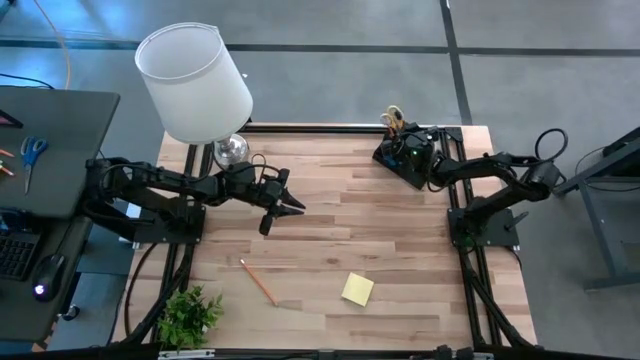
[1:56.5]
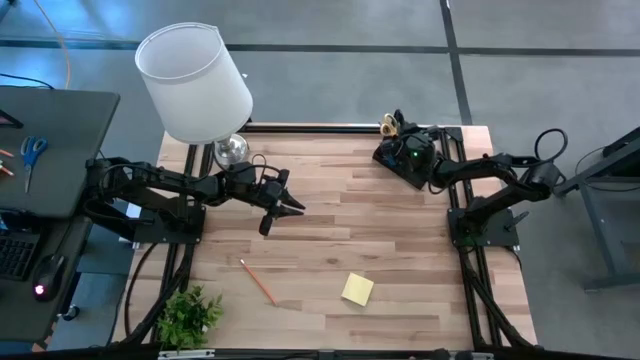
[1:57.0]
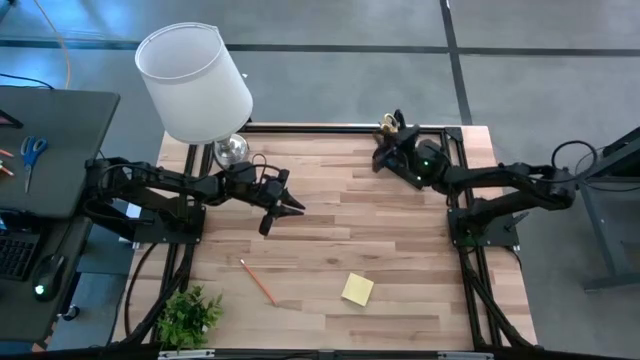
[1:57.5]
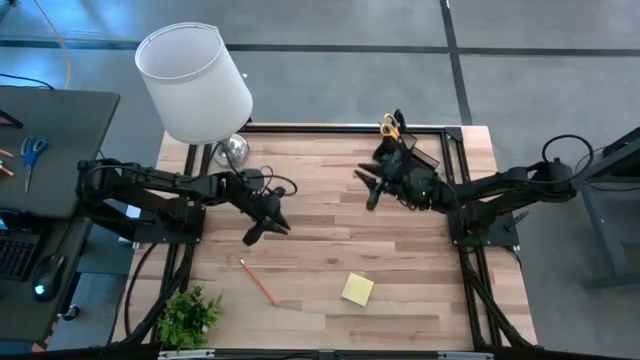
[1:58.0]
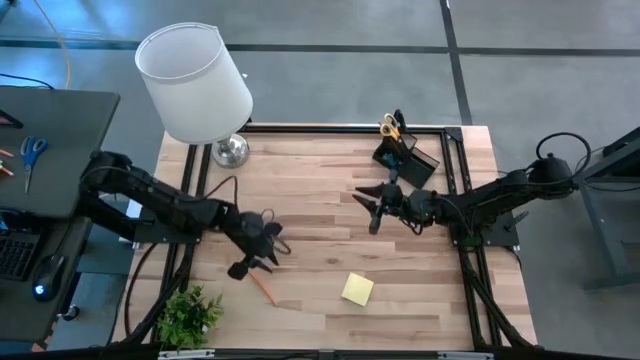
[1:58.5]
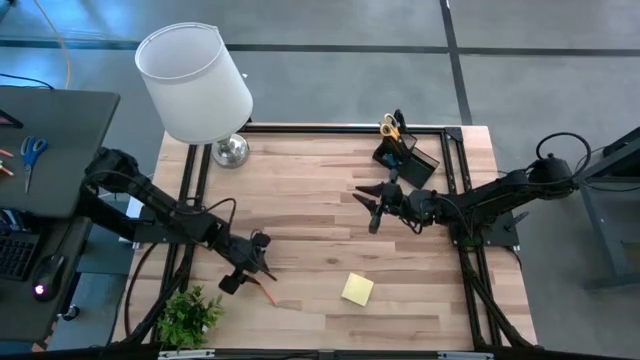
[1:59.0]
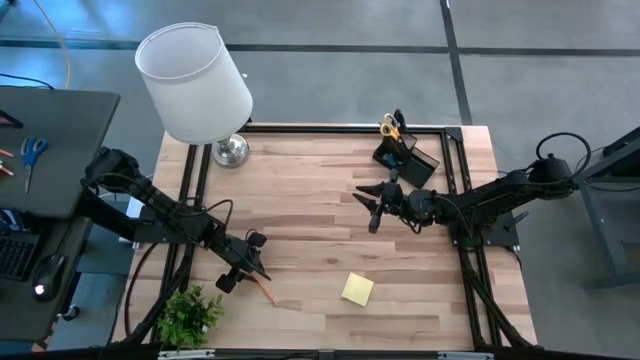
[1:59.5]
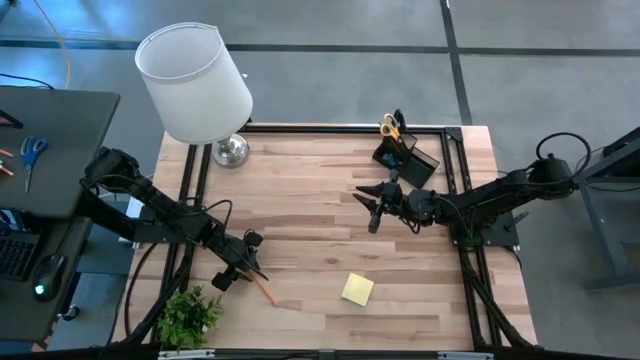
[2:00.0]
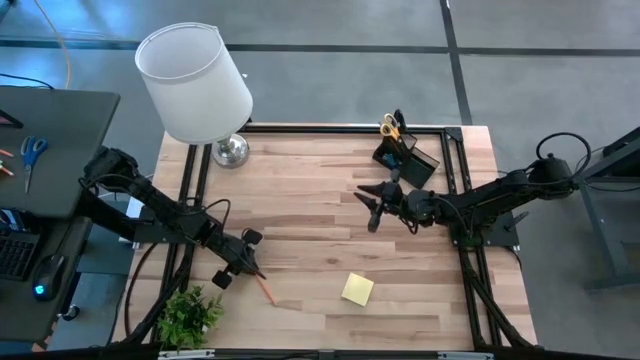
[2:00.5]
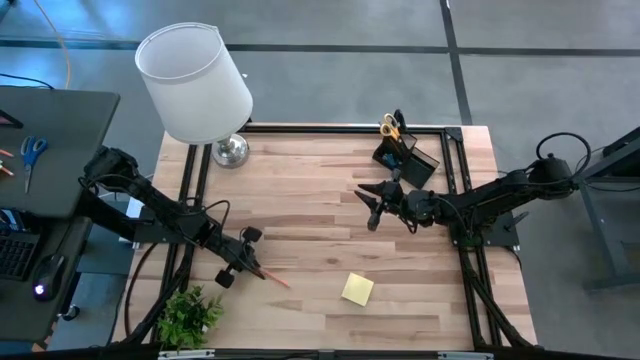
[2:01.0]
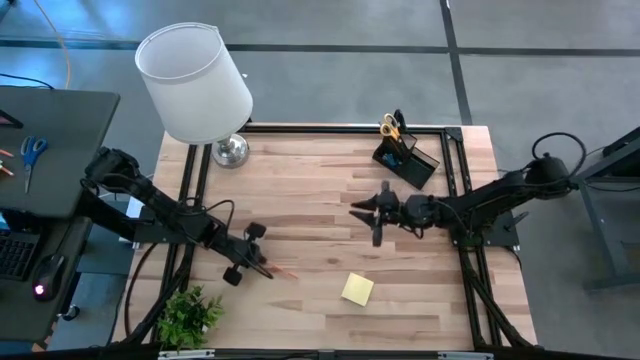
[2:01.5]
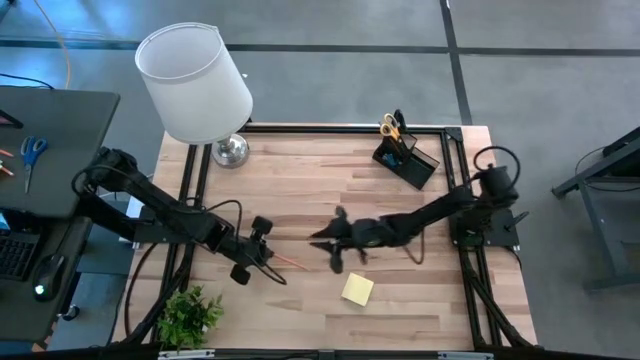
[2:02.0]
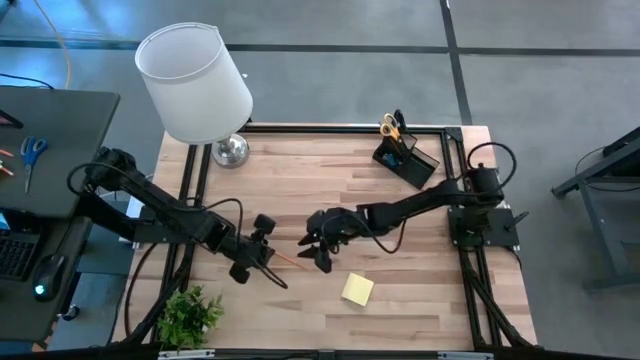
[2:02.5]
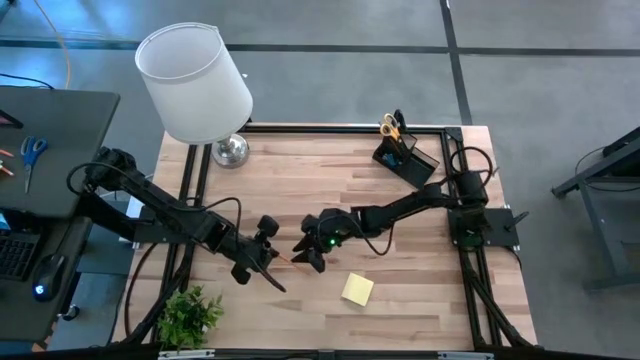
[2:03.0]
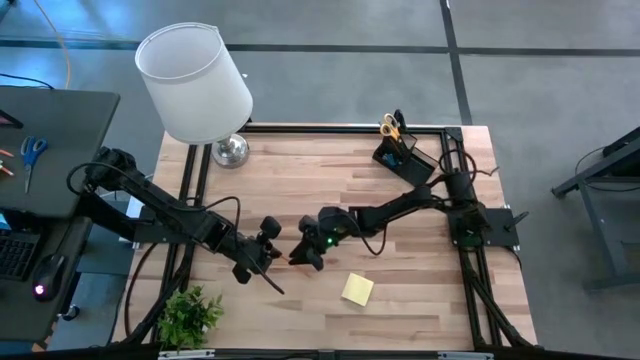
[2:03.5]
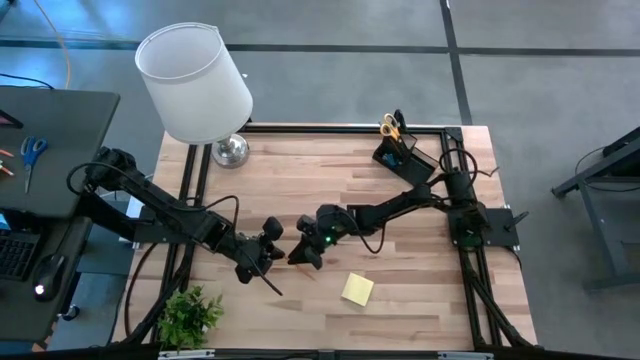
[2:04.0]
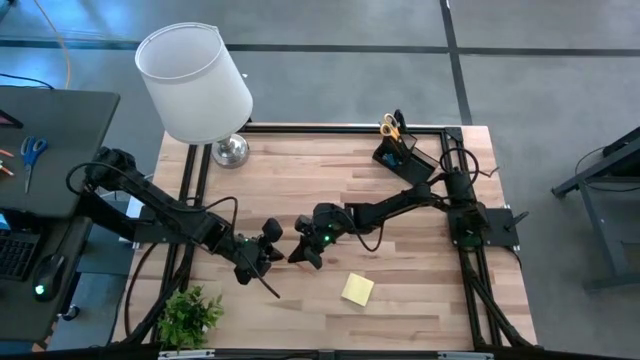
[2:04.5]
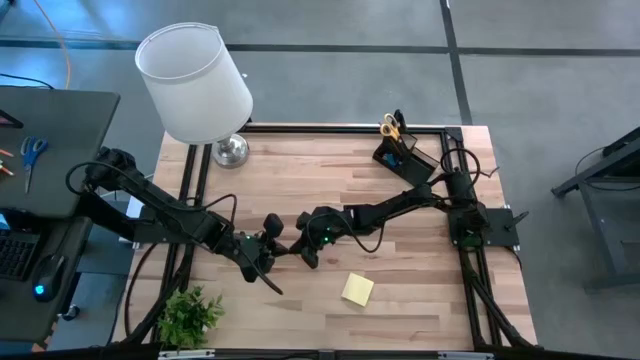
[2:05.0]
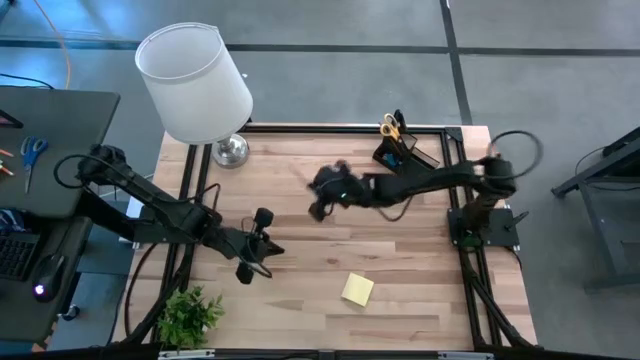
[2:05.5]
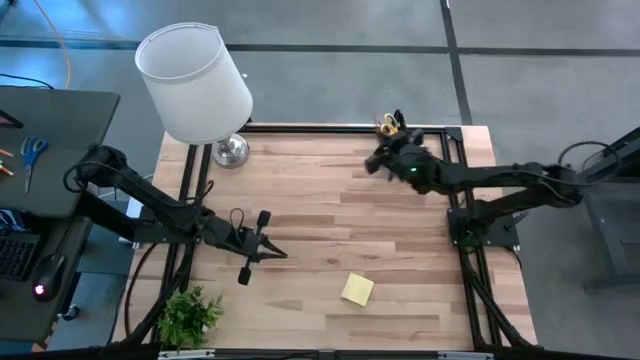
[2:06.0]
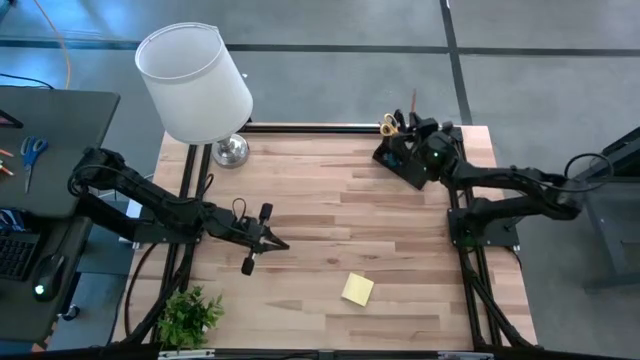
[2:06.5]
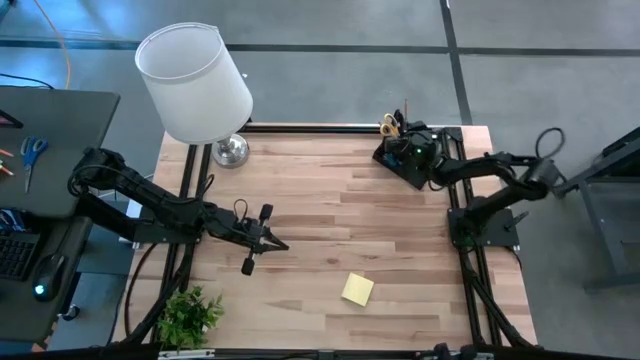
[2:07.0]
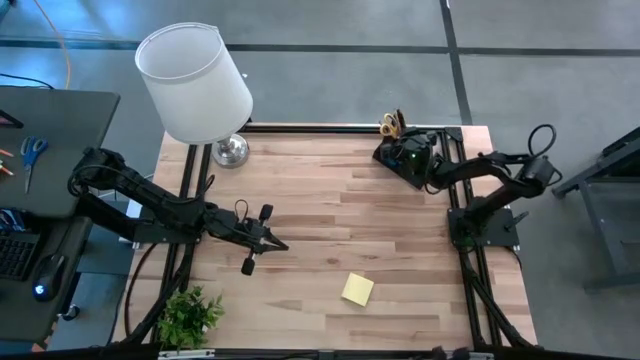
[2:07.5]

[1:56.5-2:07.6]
Task: Pick and place office supplies into organizer
Put the orange pencil into the mesh desk organizer

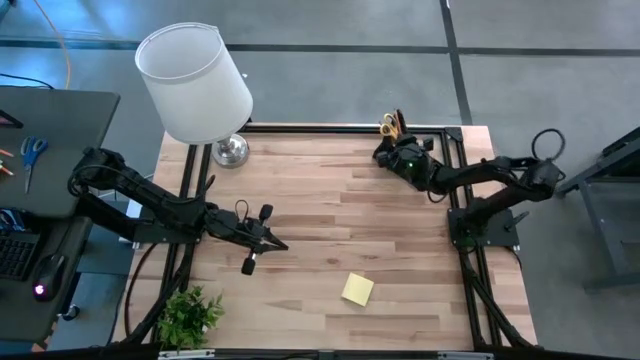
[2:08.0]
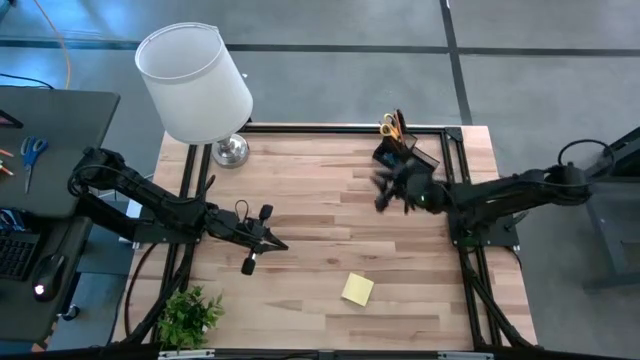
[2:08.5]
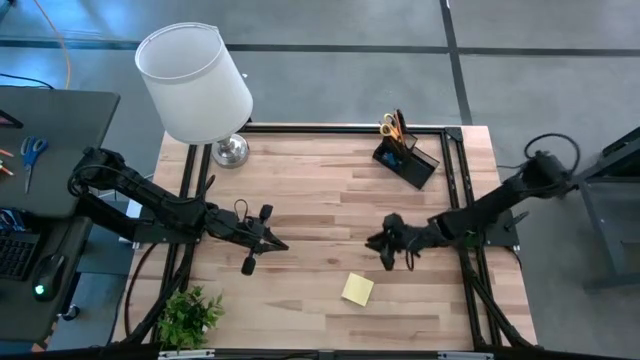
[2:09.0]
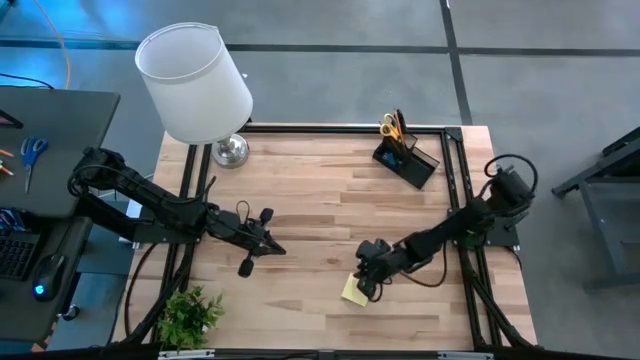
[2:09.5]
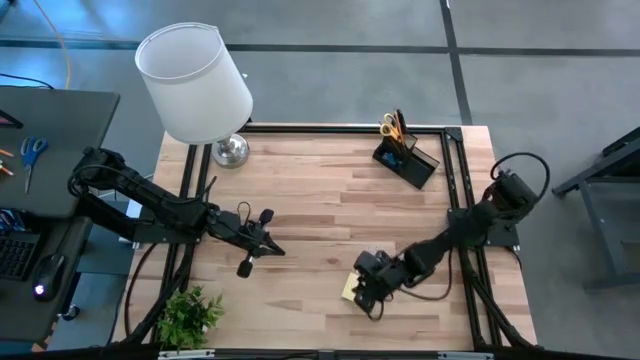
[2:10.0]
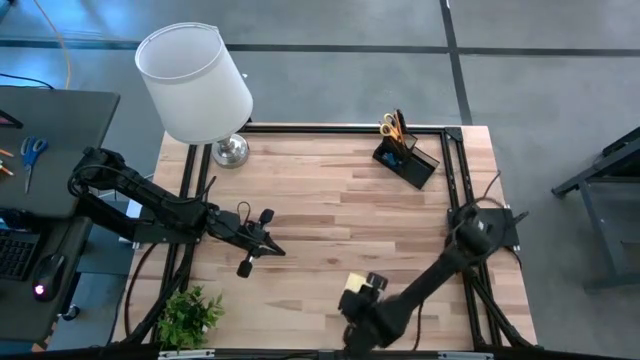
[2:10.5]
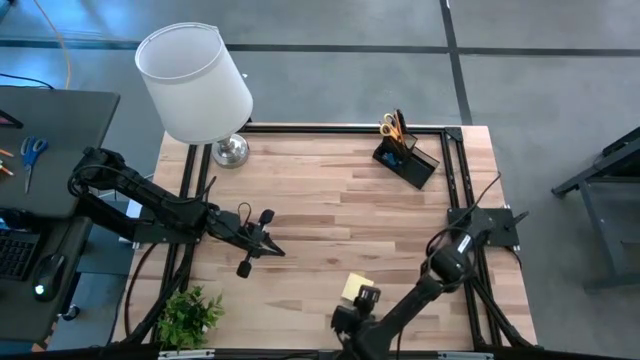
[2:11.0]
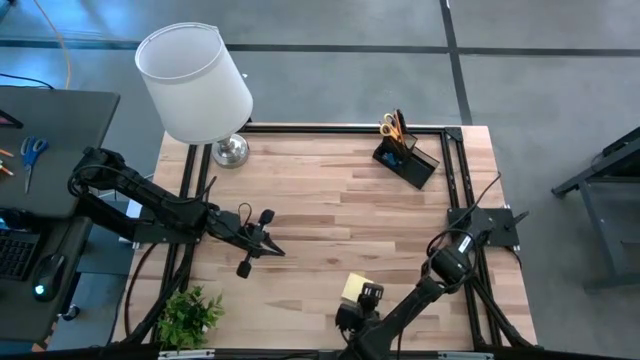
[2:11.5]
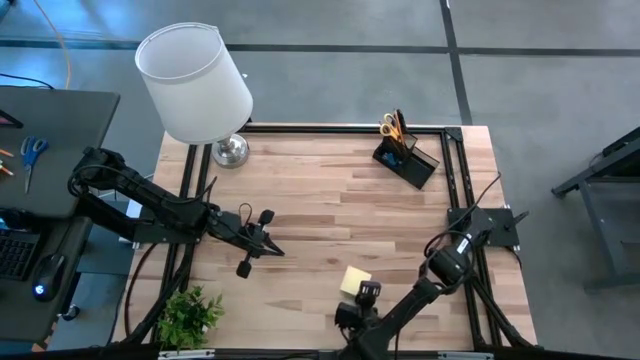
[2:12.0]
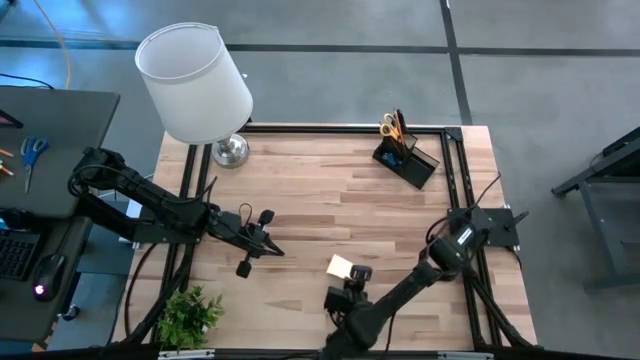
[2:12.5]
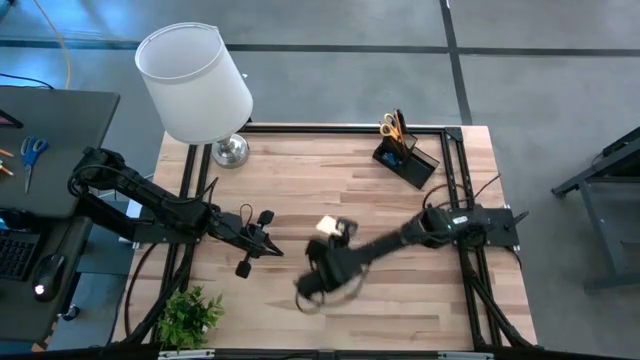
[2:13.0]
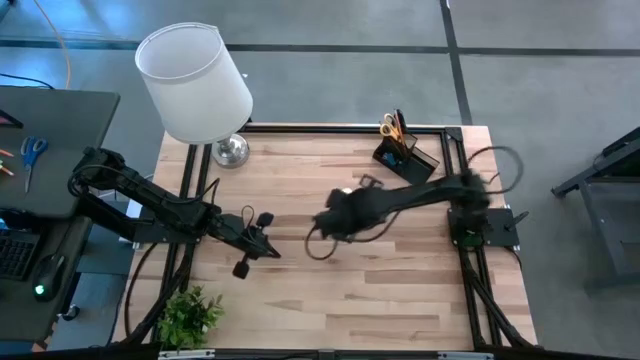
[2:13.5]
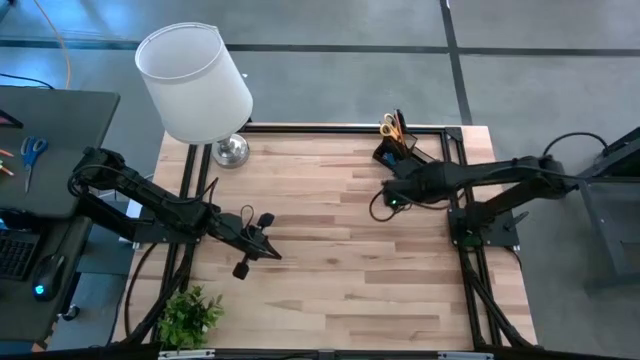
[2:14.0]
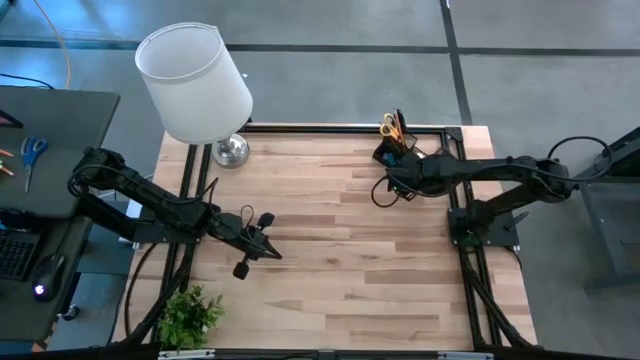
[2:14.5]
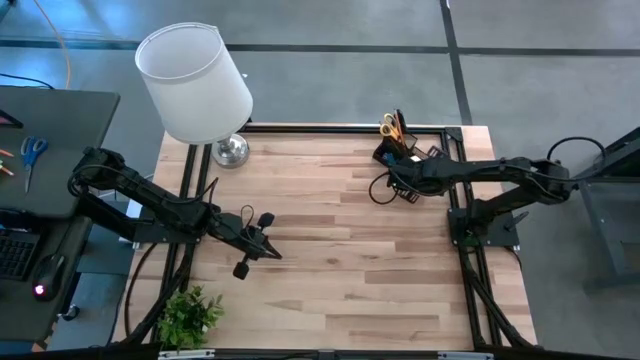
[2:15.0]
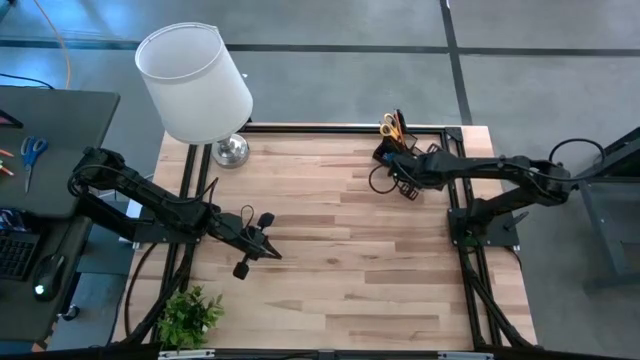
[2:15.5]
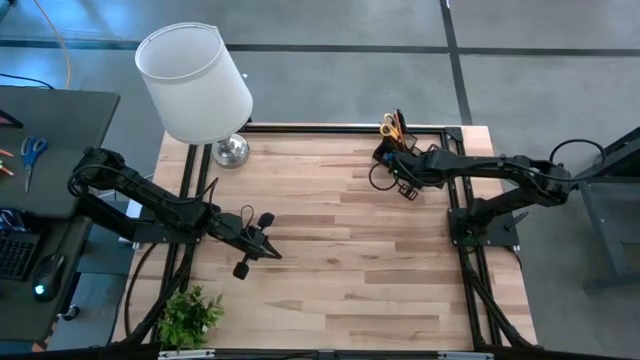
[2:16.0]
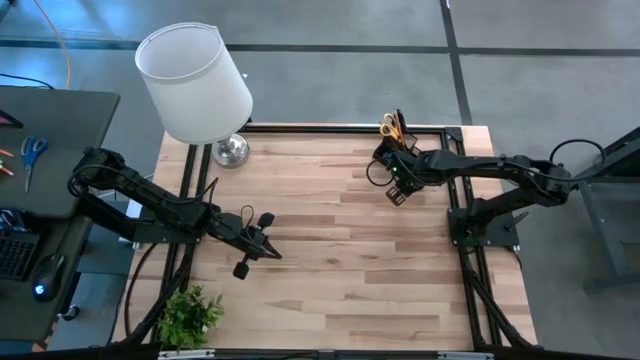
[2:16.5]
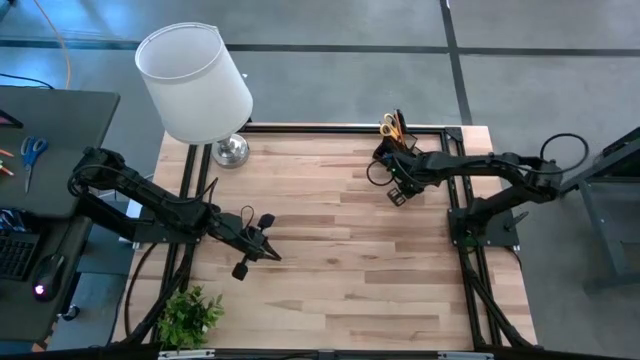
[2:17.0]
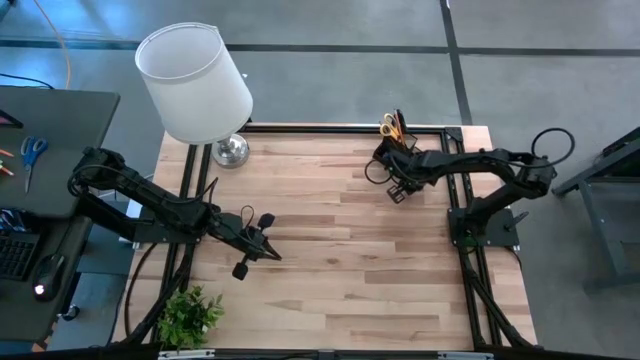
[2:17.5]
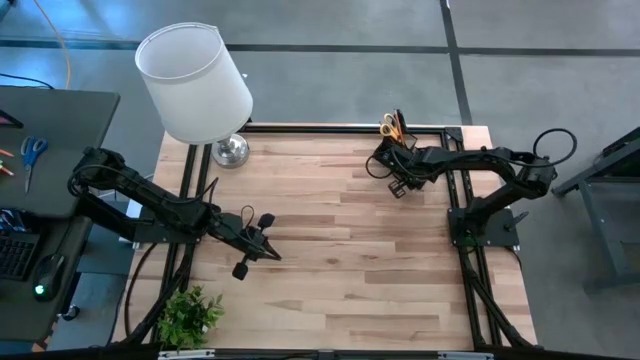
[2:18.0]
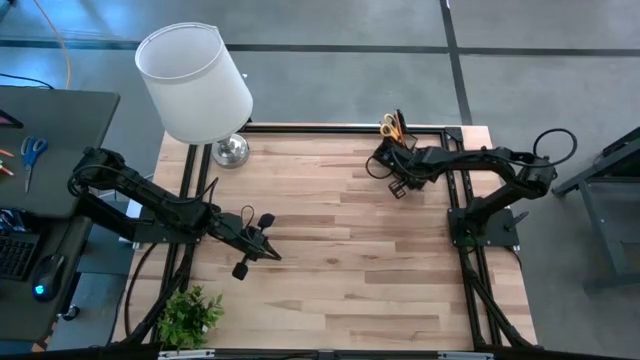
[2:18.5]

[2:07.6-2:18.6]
Put the yellow sticky notes into the mesh desk organizer
